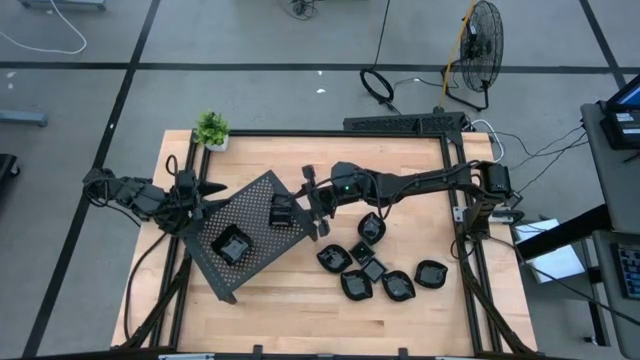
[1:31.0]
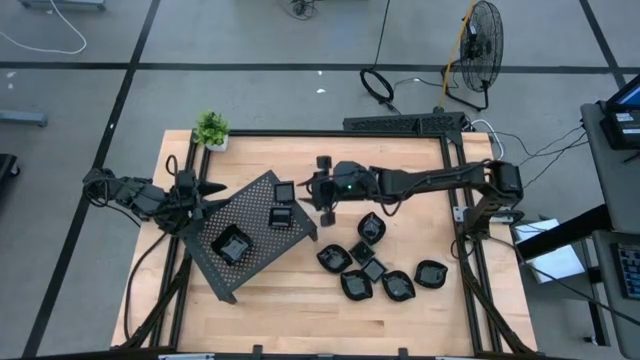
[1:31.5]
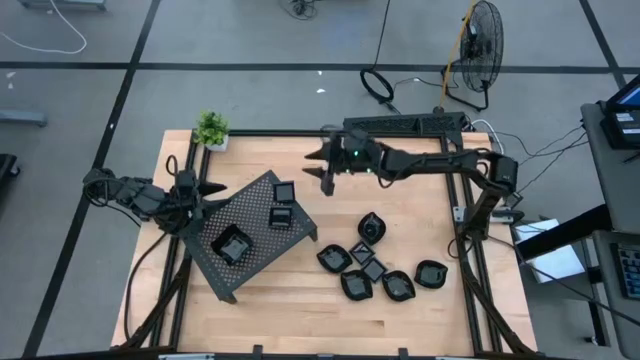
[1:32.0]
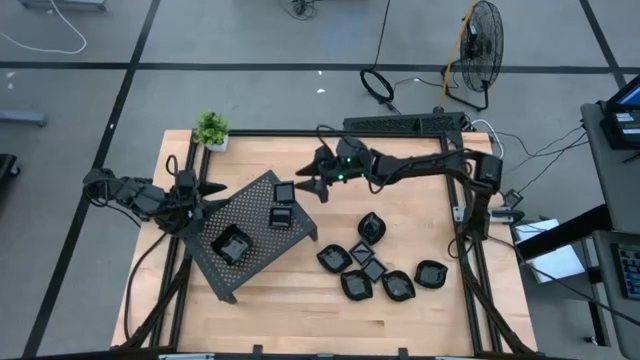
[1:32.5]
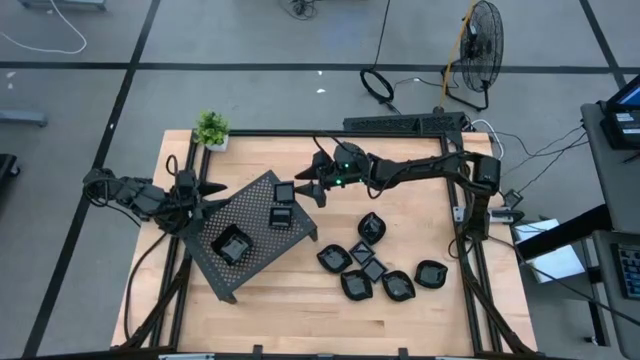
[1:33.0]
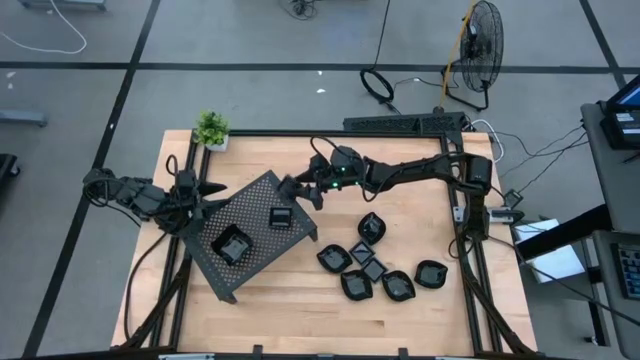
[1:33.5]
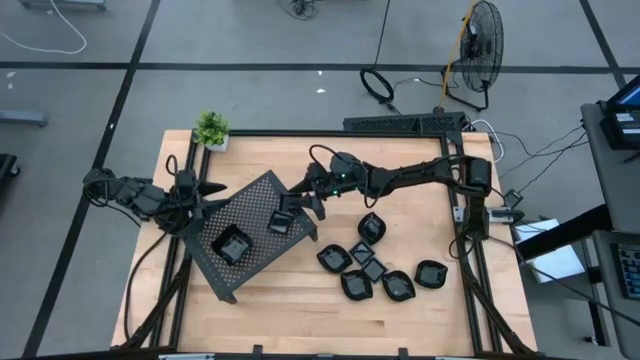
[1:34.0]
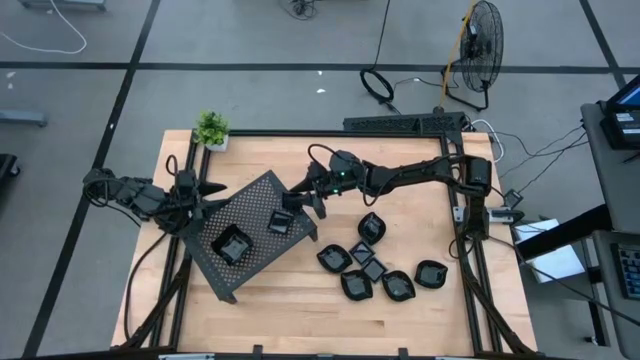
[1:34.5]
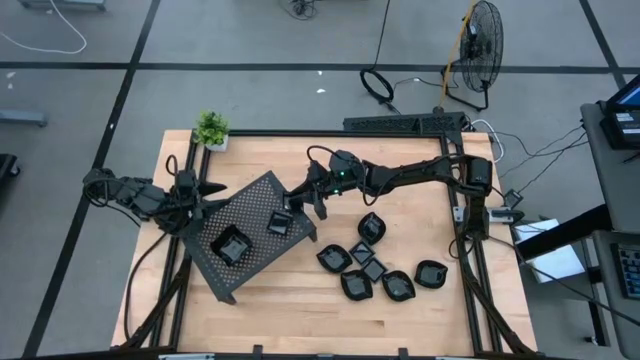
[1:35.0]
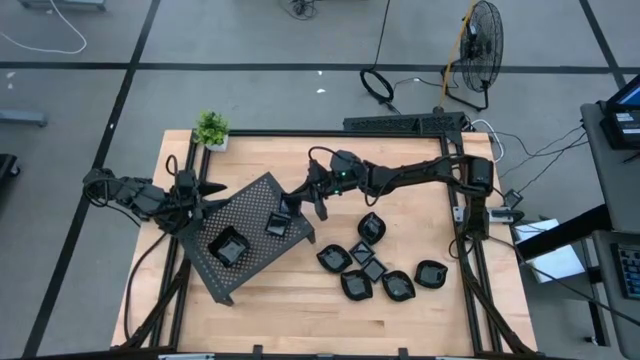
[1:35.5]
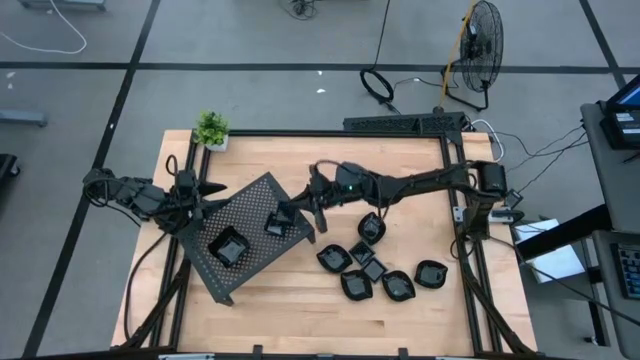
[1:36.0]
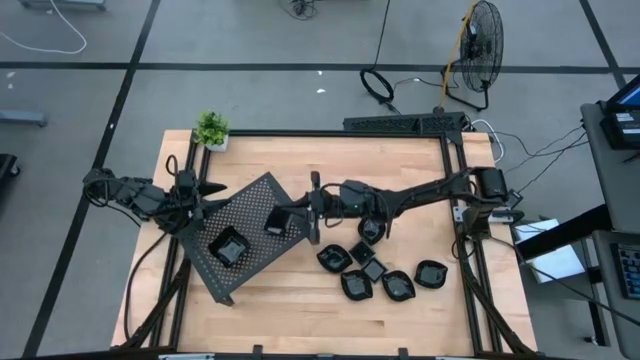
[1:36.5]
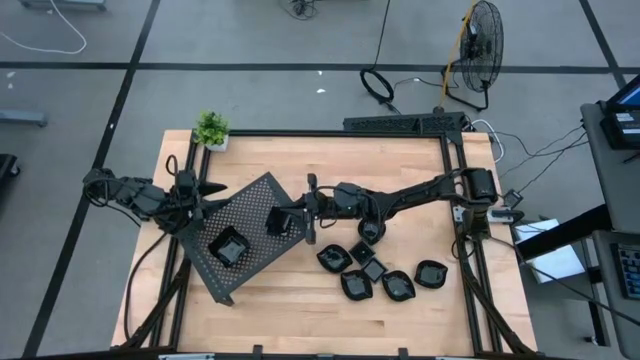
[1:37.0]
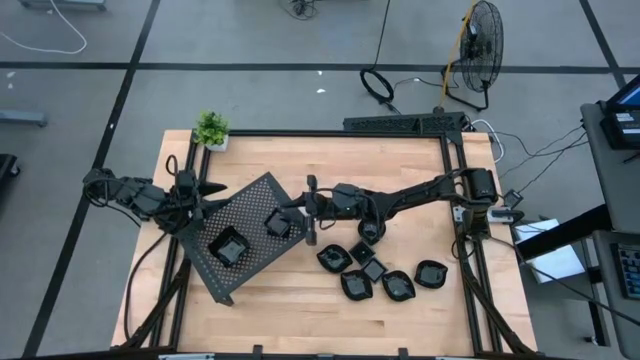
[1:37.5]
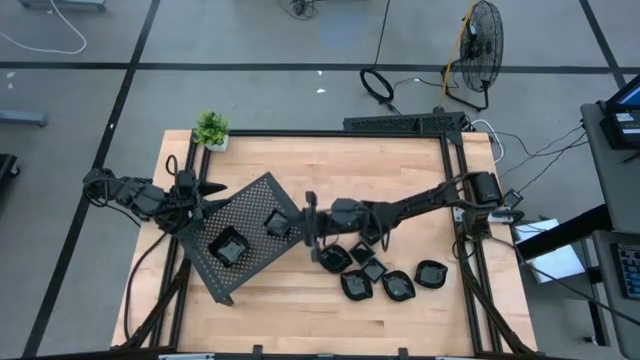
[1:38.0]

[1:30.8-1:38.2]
Task: Pick & Place Mini shaped plates
Stack the square plate on top of the square plate on the shelf

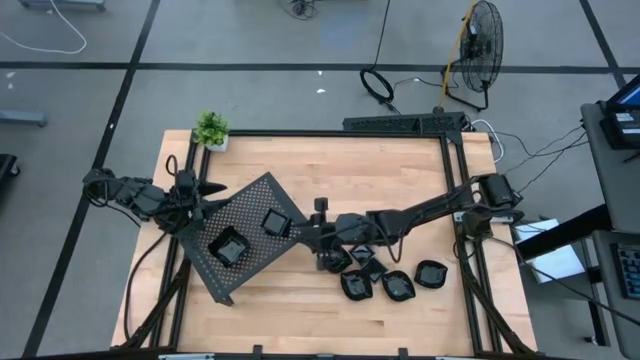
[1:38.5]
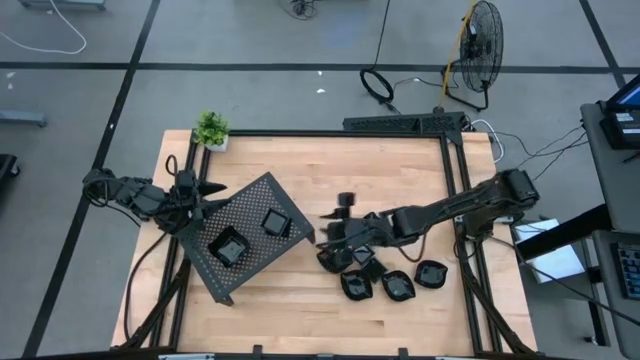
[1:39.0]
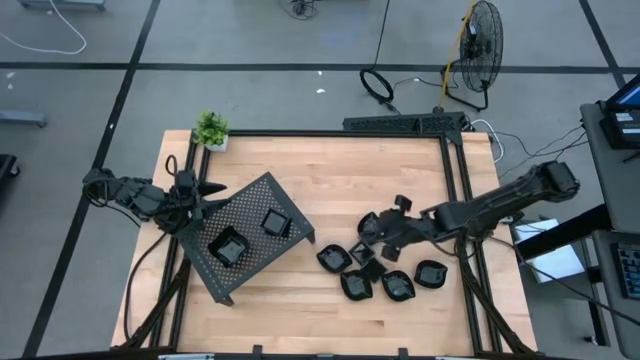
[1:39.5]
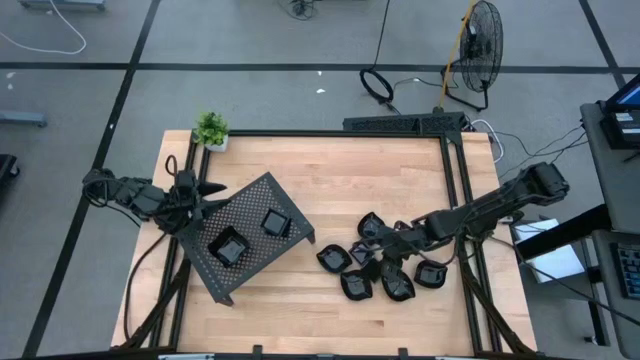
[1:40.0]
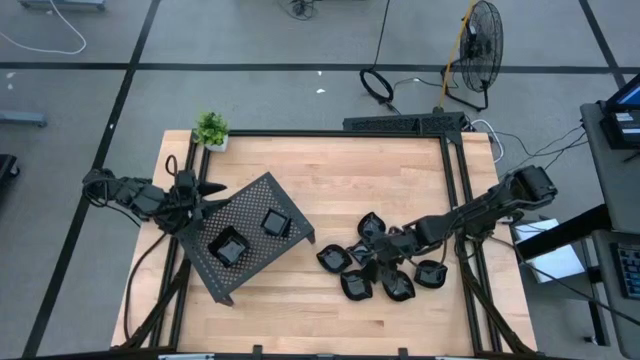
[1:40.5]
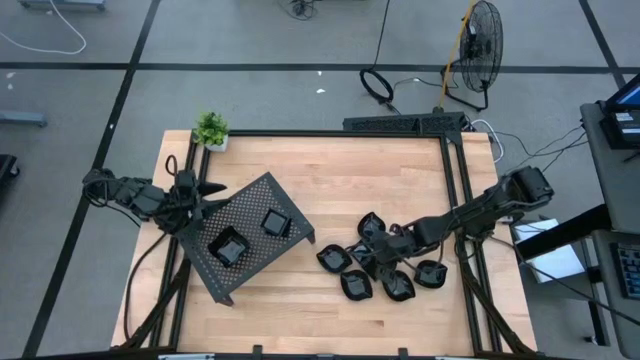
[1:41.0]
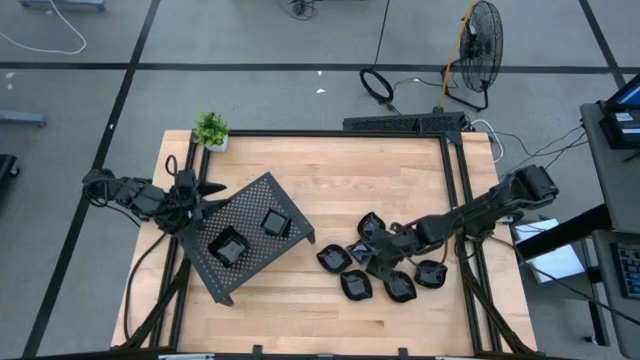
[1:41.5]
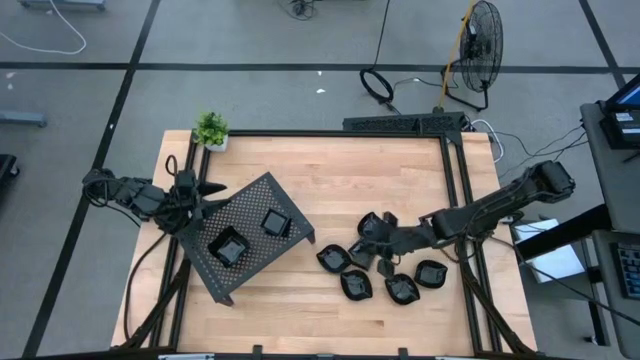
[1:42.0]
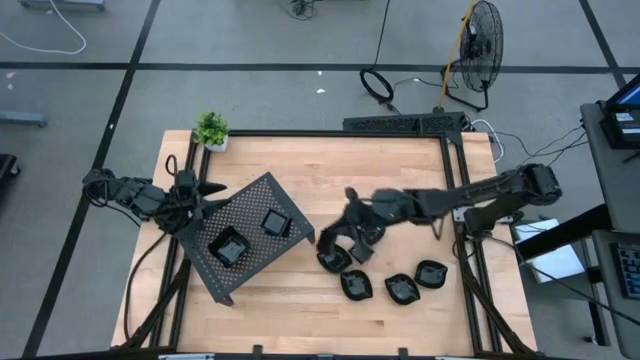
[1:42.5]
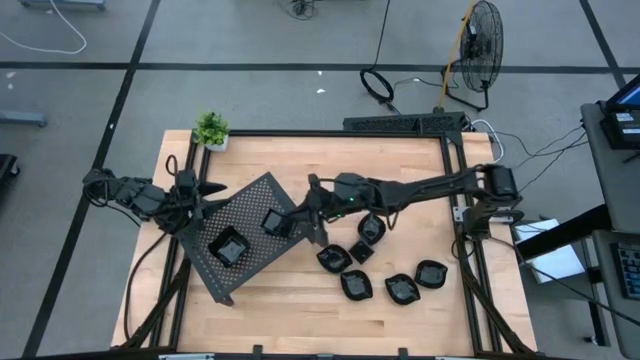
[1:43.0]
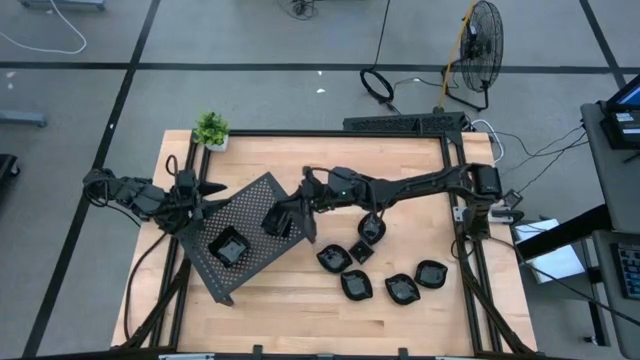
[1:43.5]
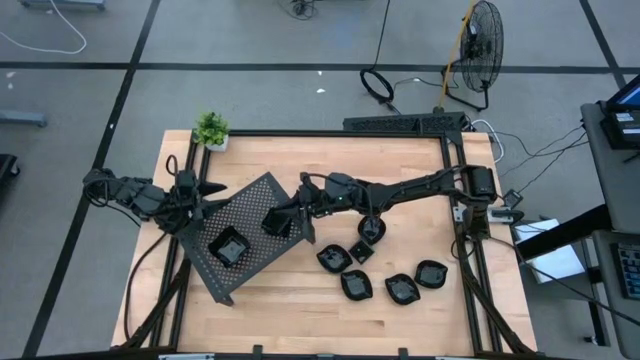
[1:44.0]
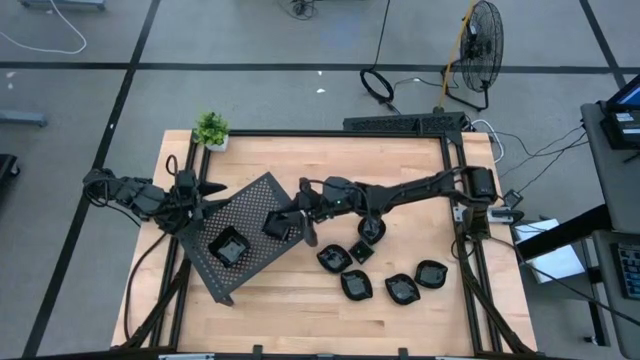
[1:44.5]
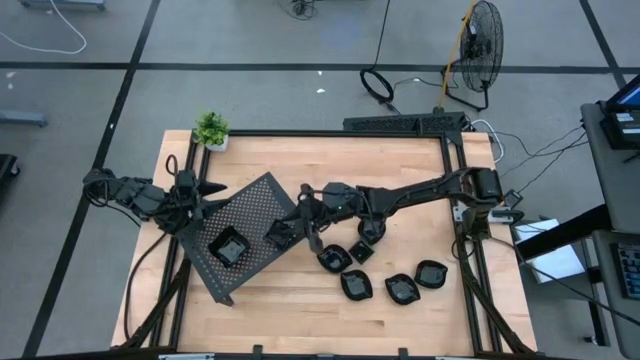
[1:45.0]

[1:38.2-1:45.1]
Stack the square plate on top of the square plate on the shelf

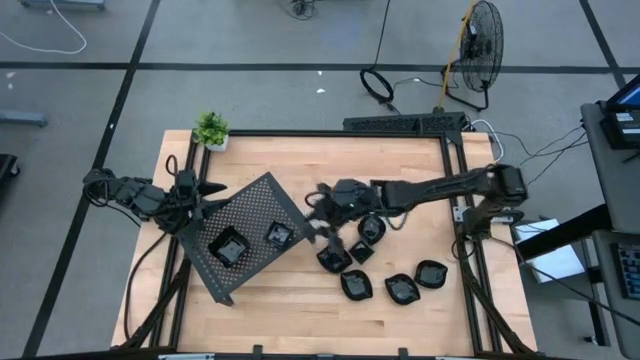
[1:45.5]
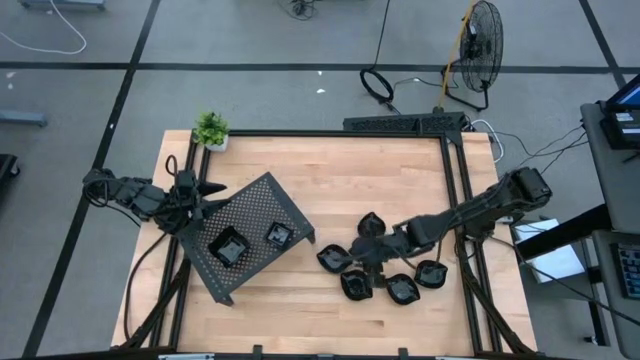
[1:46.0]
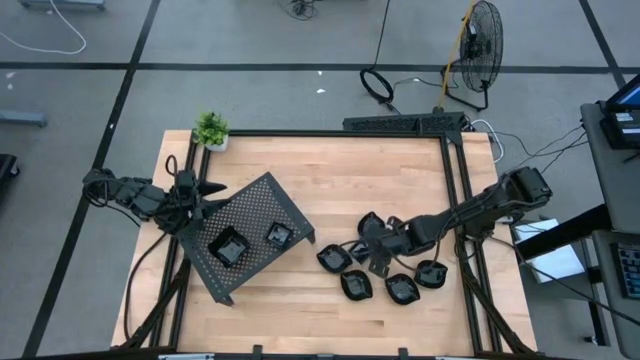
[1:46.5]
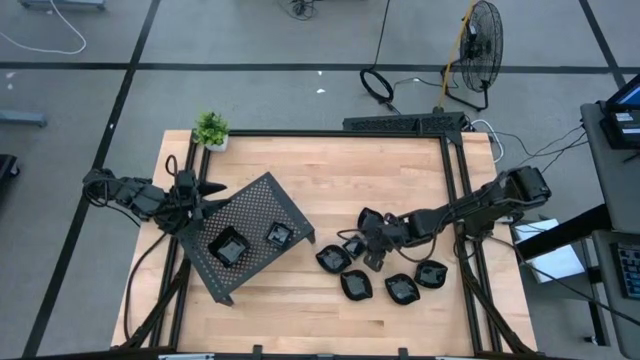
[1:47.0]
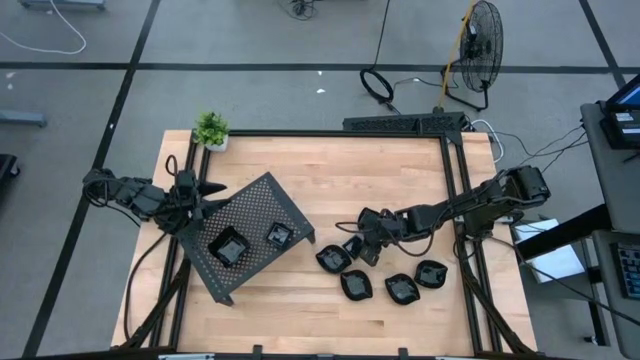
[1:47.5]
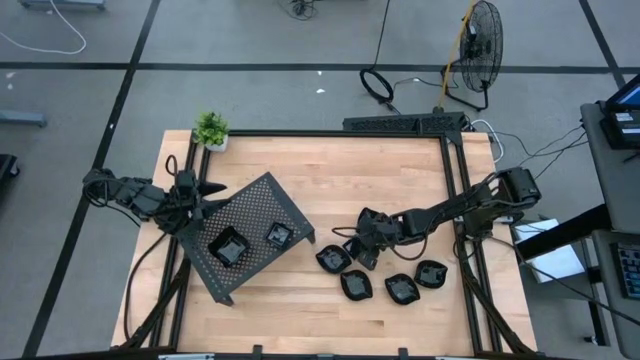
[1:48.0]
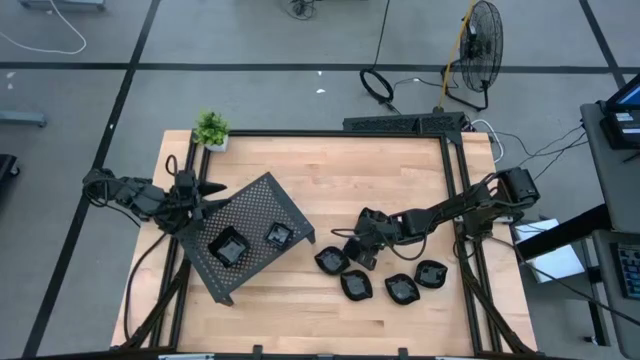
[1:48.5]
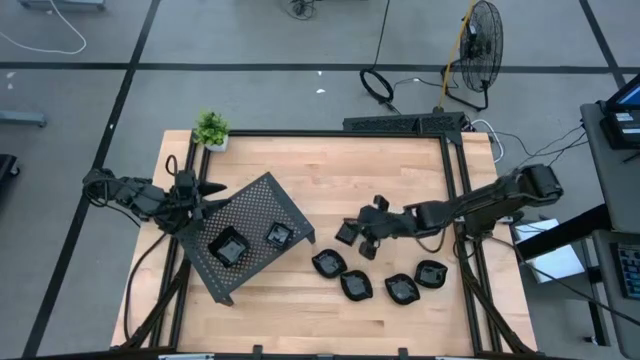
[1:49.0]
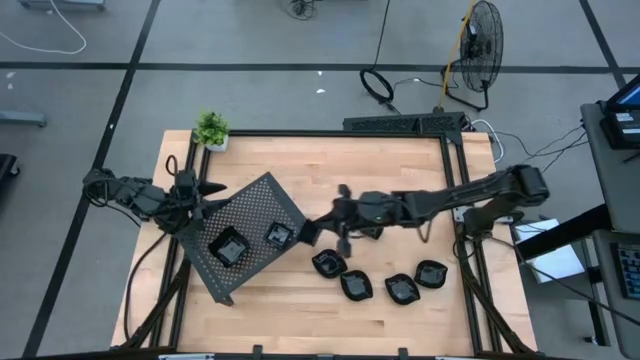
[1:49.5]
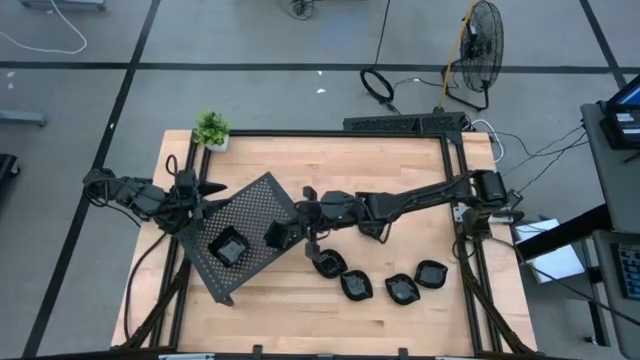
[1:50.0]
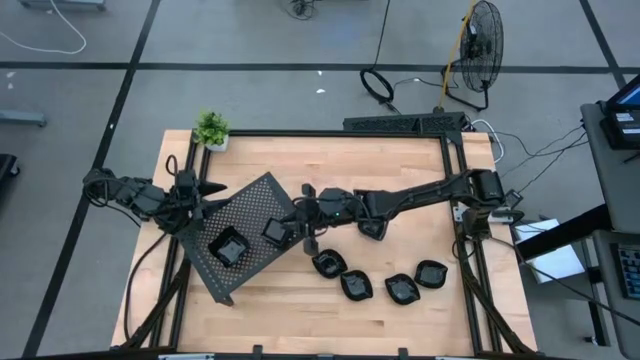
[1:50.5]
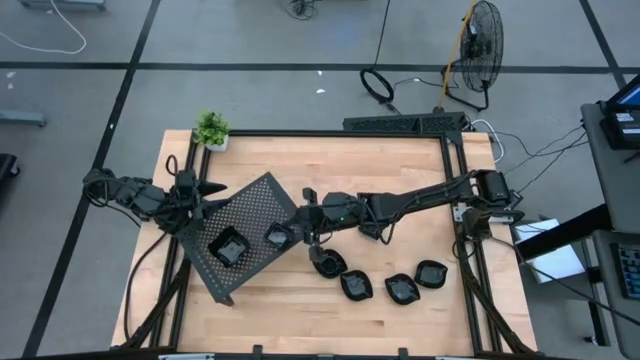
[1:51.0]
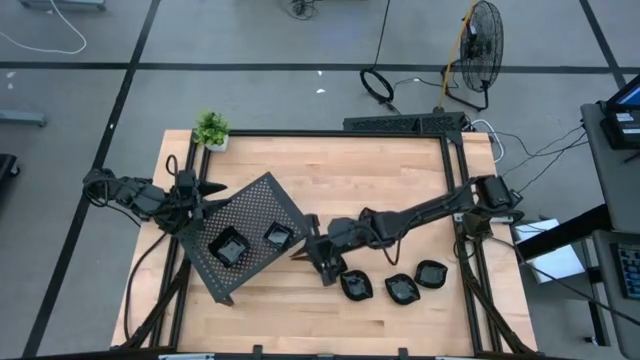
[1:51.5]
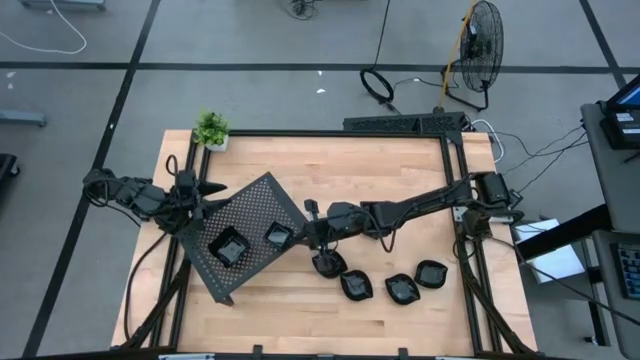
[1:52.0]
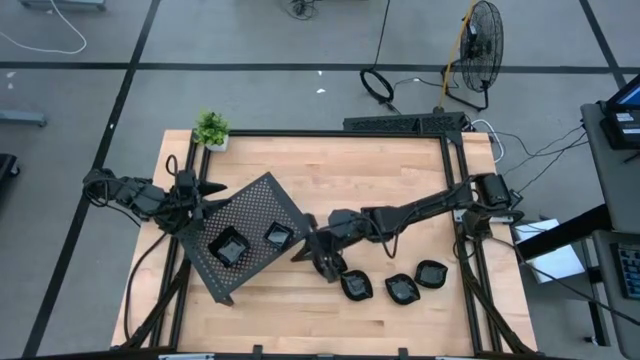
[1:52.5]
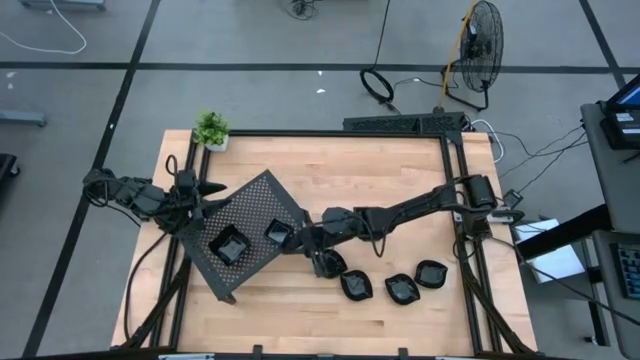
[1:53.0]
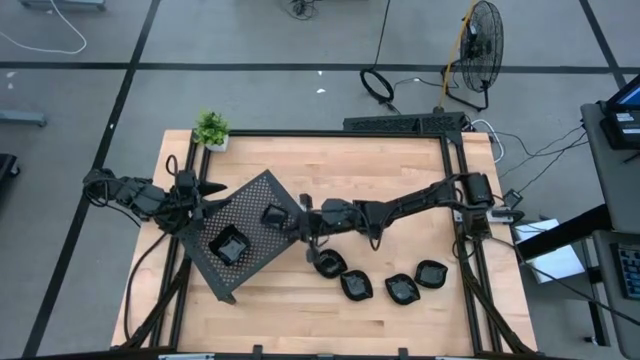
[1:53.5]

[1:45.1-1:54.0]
Stack the square plate on top of the square plate on the shelf
